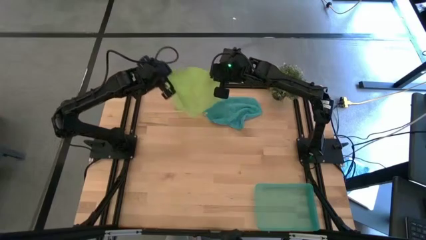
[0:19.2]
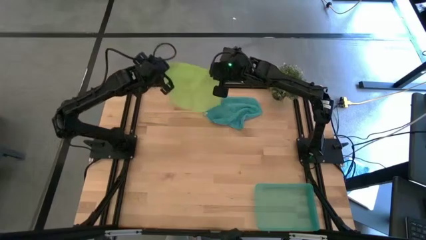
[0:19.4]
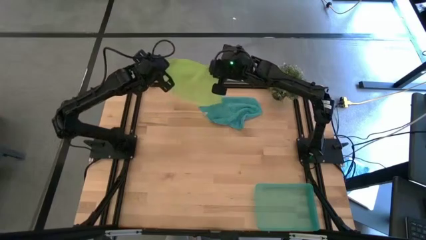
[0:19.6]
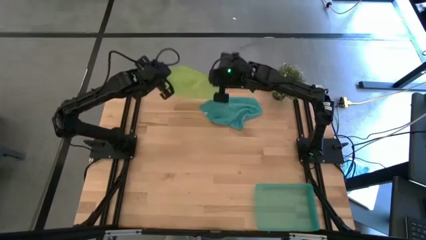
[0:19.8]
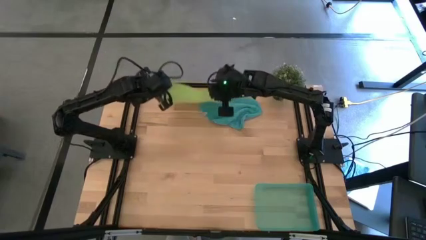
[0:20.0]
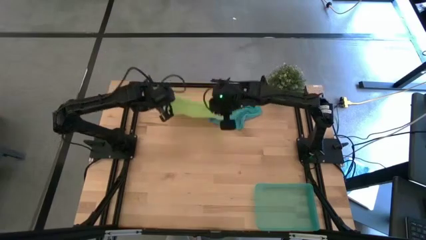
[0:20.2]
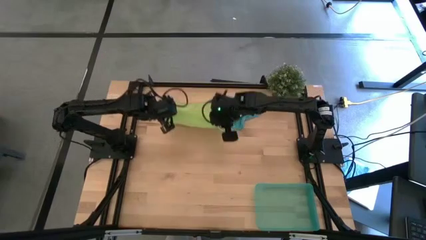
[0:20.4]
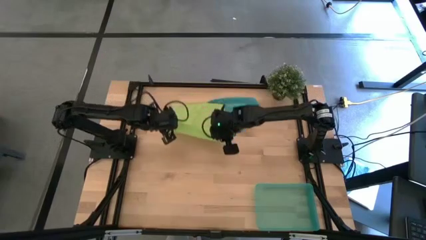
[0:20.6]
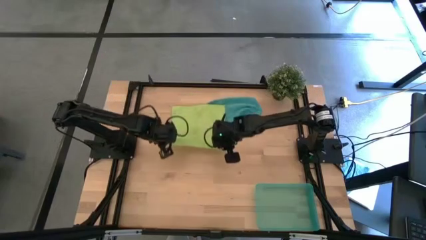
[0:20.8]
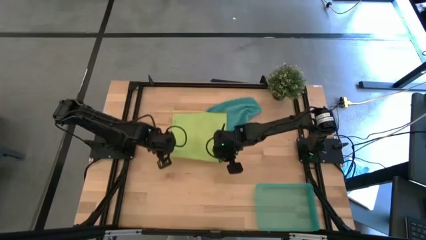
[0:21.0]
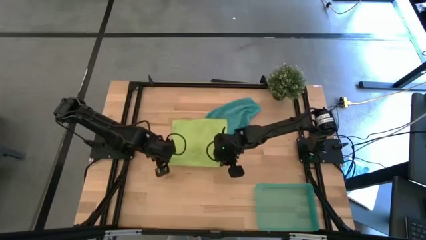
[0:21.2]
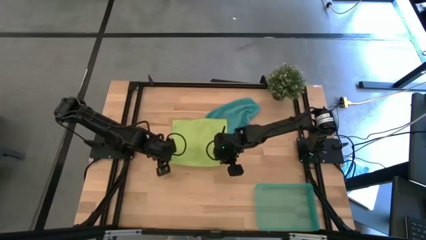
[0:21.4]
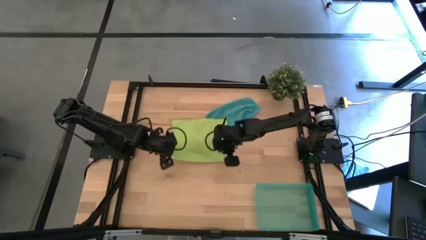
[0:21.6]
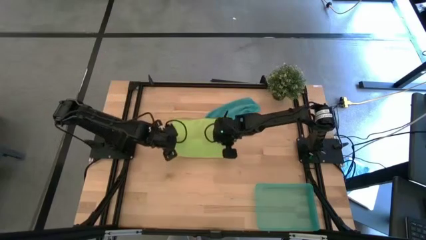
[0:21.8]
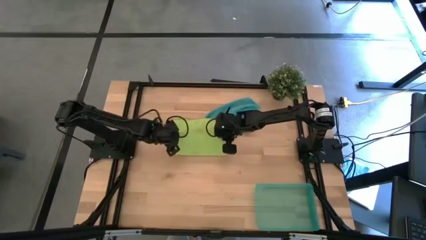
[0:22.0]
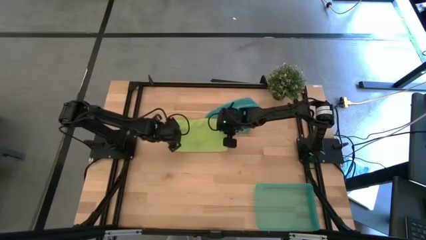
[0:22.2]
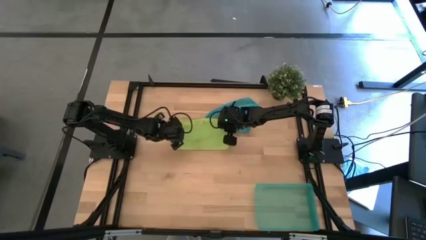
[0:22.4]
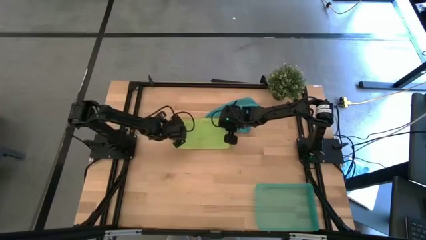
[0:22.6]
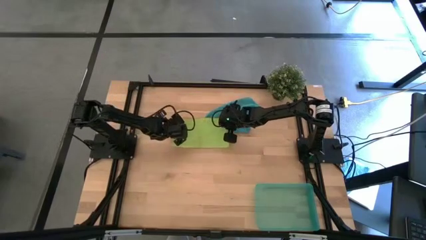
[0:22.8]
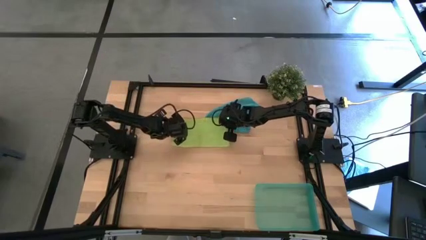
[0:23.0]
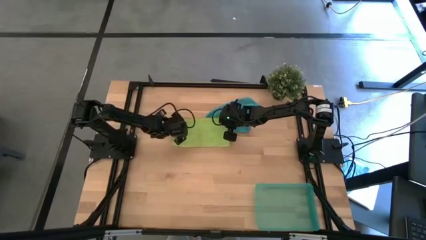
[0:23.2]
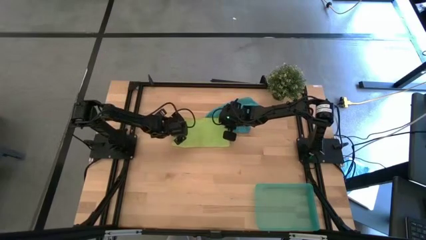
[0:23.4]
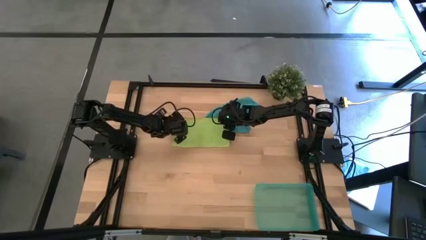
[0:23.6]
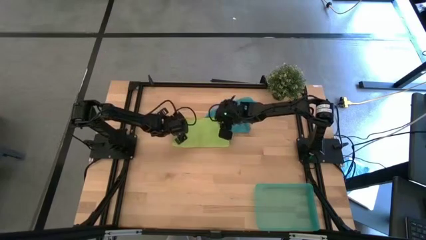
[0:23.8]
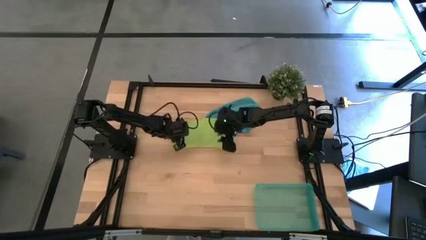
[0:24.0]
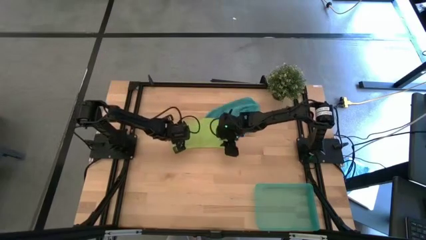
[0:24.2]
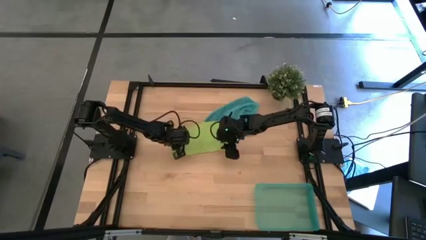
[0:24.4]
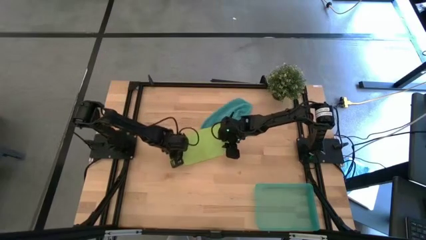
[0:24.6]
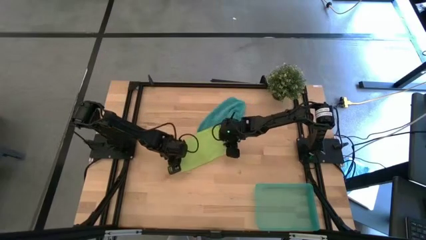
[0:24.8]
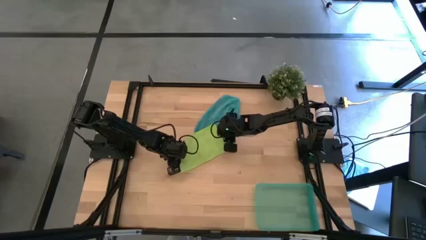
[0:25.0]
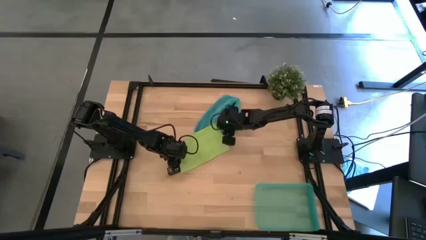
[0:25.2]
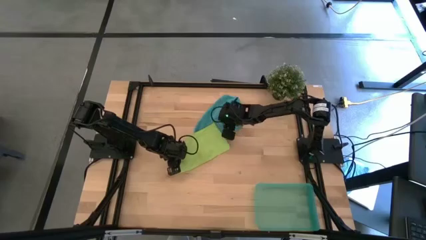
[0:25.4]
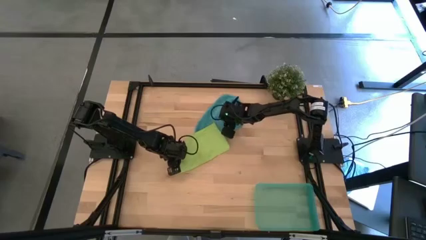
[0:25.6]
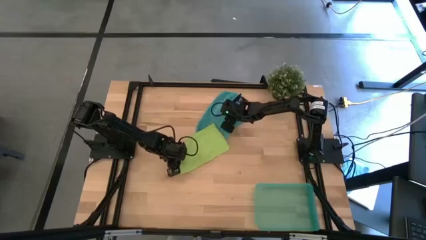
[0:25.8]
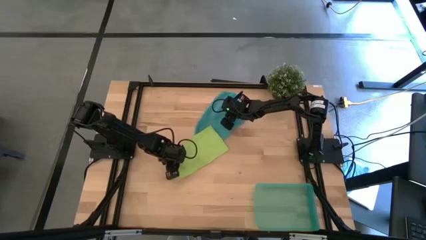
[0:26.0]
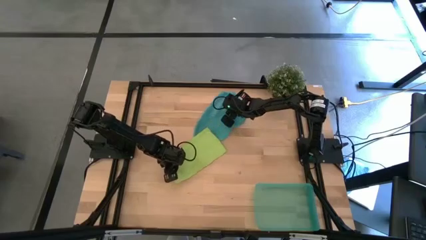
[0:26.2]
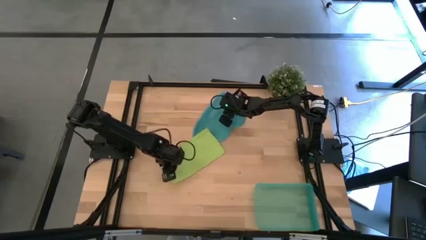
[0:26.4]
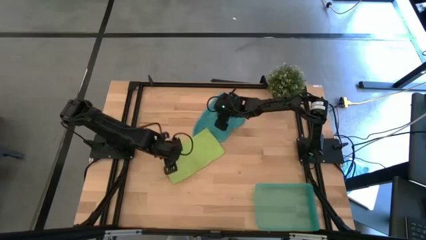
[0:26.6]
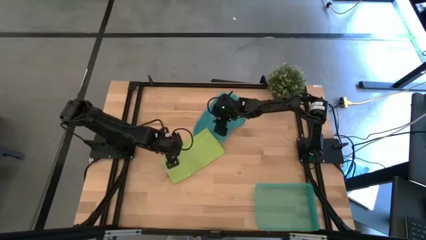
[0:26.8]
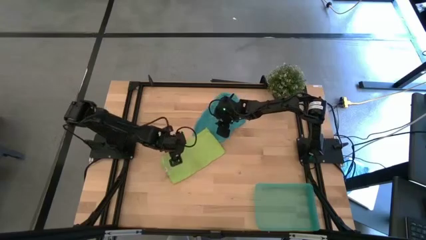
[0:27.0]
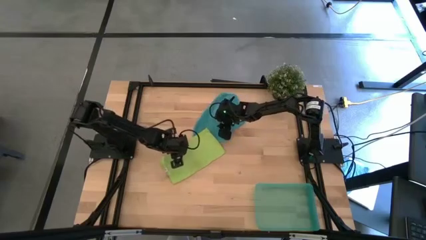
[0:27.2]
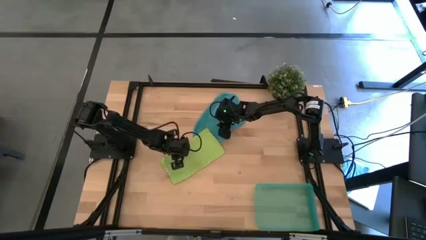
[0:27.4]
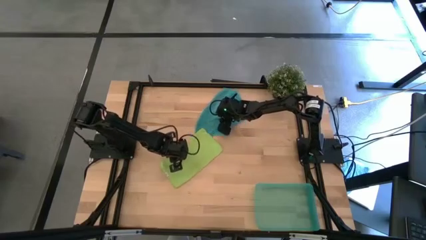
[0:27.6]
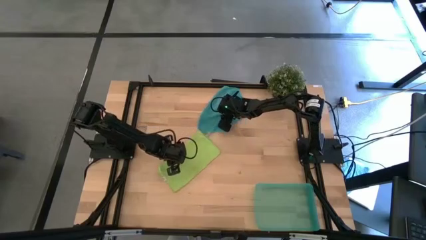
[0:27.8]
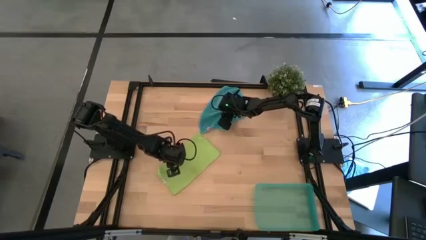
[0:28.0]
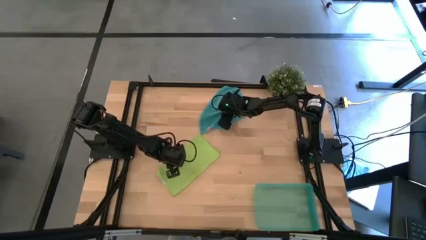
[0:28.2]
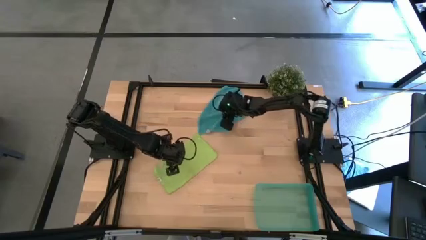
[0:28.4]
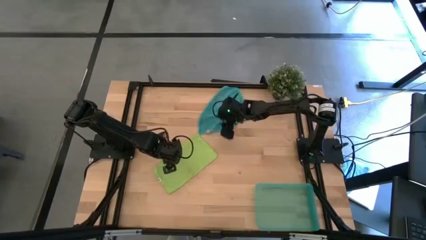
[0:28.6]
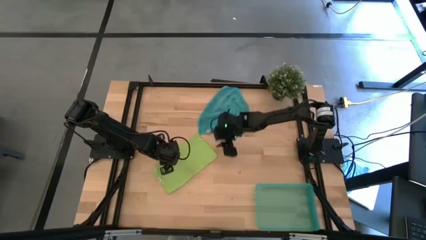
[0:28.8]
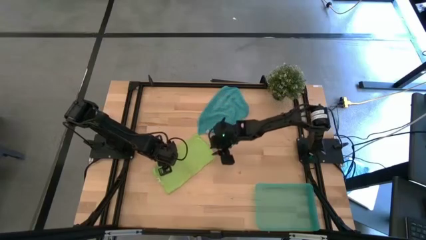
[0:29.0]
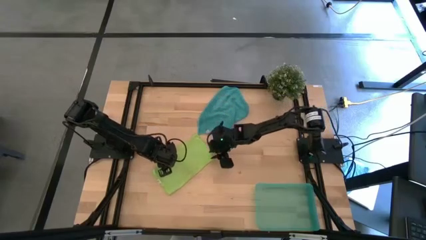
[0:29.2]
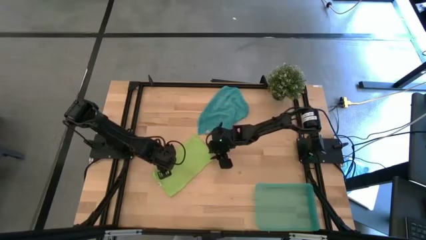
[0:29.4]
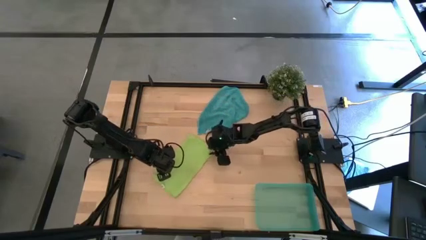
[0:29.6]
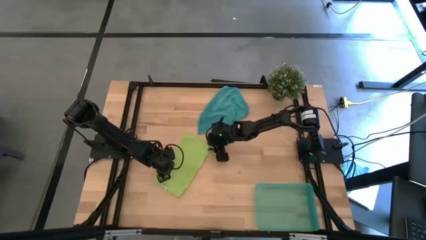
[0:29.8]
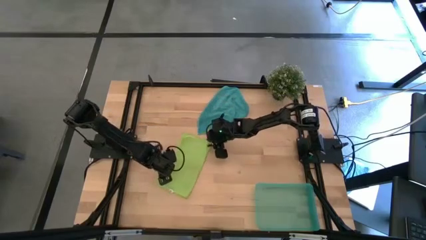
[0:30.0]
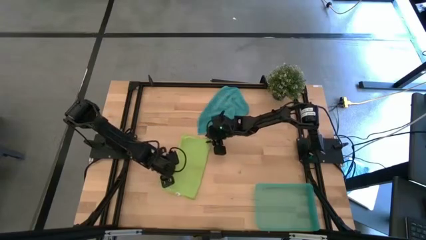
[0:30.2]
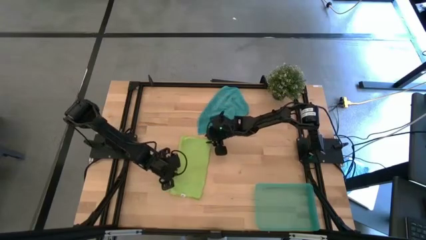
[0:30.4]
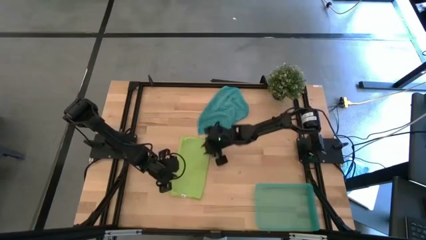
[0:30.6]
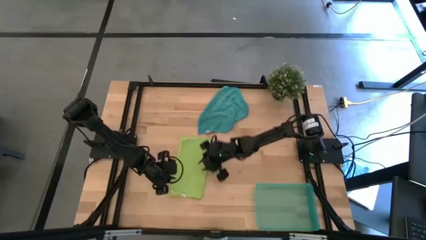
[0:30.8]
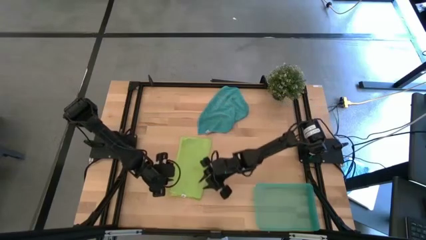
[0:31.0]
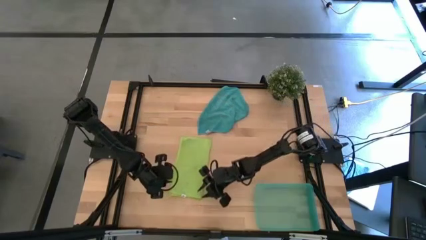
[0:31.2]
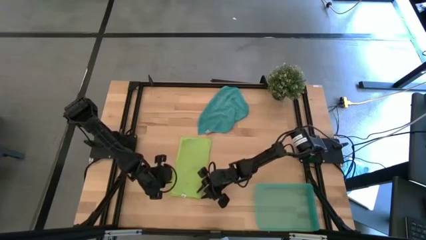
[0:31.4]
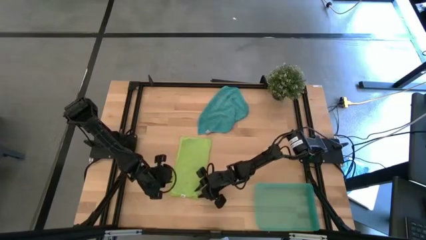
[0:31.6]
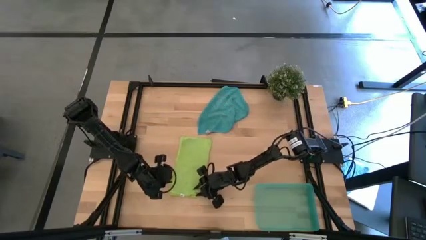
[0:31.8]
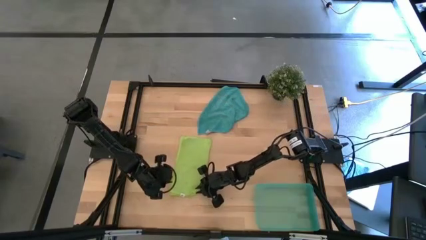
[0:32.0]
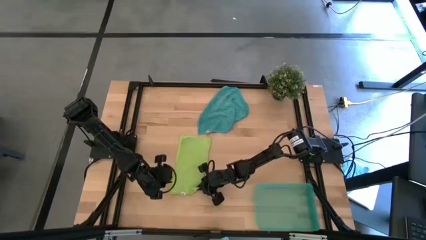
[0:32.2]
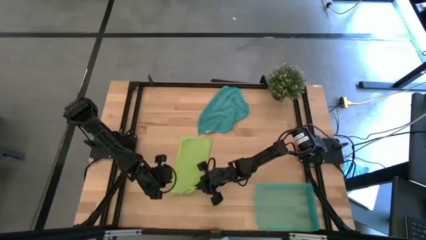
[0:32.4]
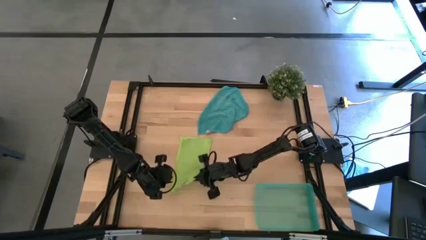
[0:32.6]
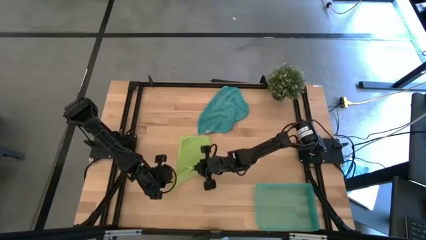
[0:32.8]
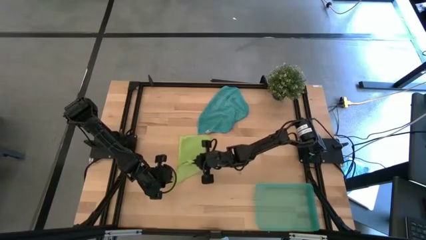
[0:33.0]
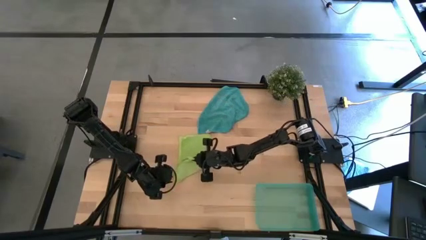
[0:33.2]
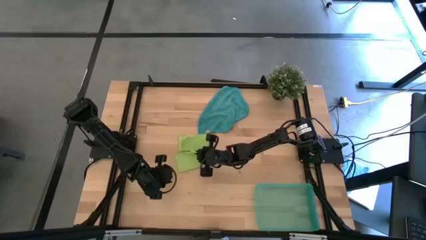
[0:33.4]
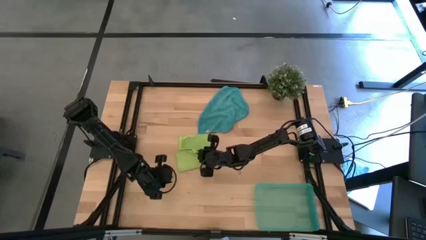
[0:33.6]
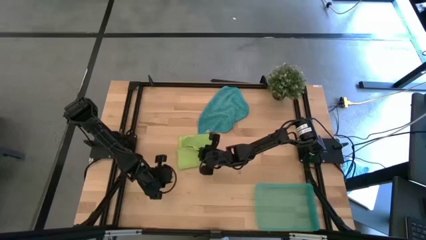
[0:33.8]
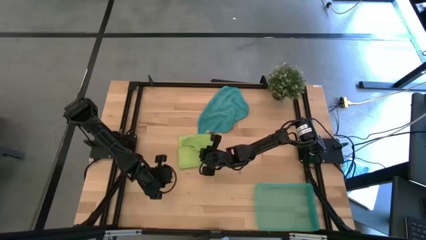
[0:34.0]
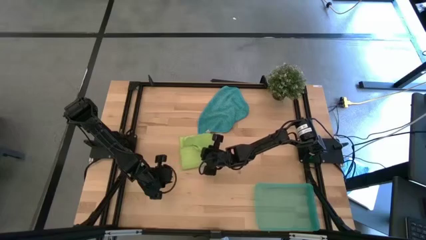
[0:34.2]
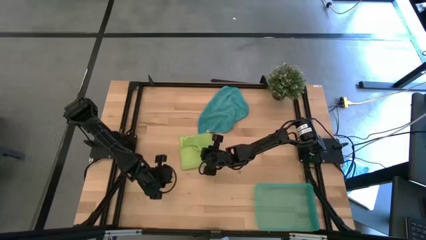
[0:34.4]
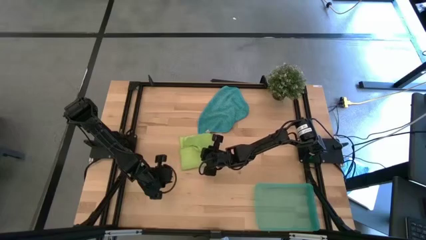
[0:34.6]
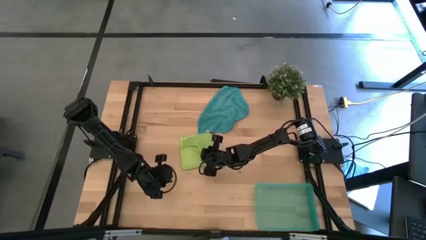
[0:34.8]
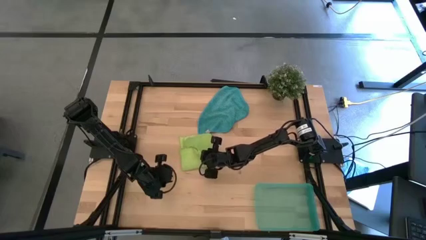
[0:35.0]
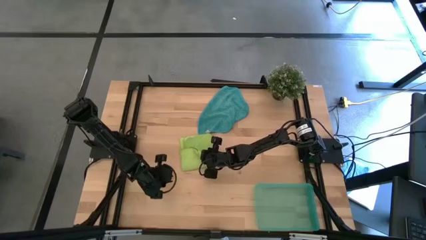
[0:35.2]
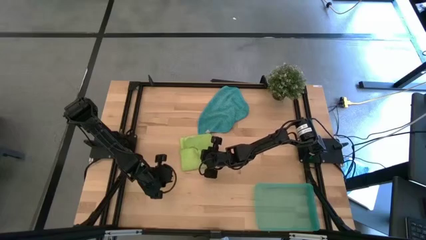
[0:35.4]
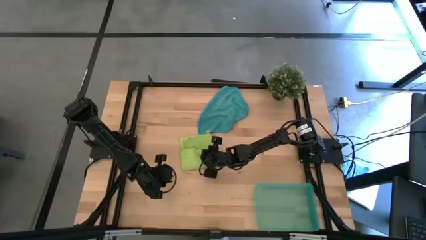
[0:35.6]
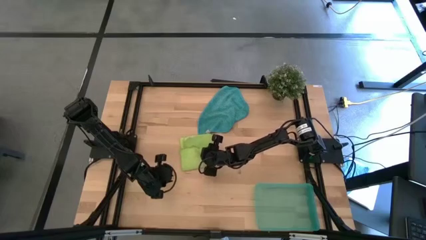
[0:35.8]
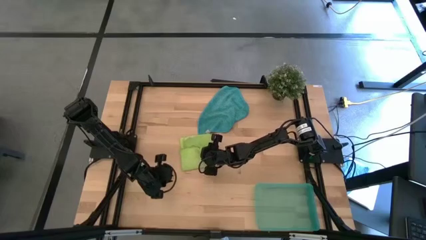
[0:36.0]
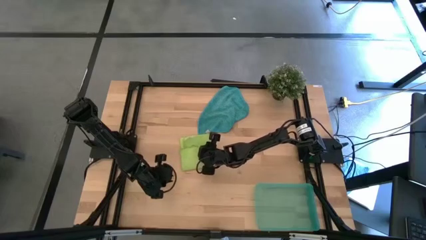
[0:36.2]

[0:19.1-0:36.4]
Task: Roll microfiber towels into tight, uniform cylinder then place into a basket
Fold the green microfiber cloth
